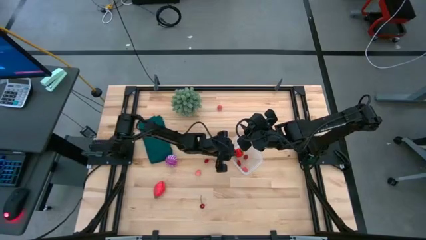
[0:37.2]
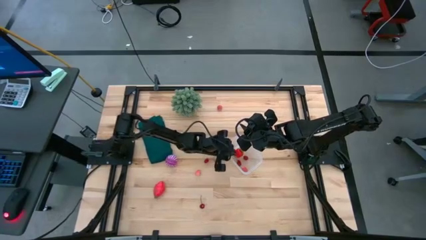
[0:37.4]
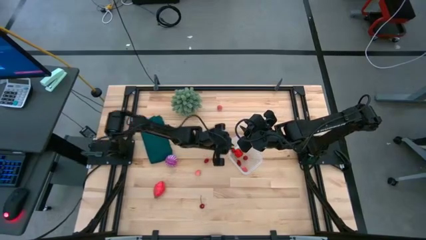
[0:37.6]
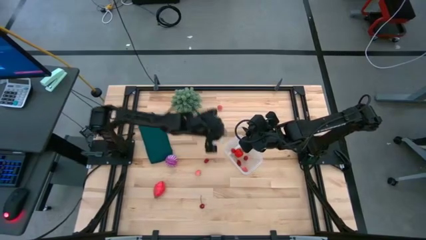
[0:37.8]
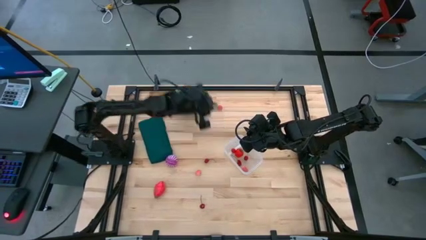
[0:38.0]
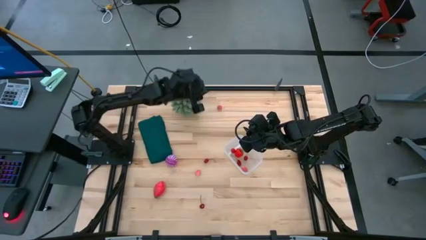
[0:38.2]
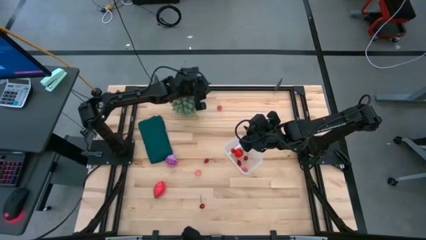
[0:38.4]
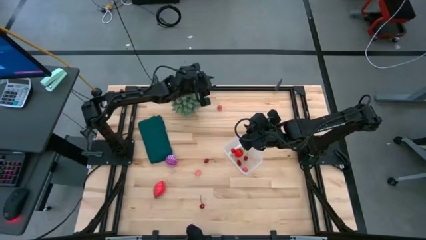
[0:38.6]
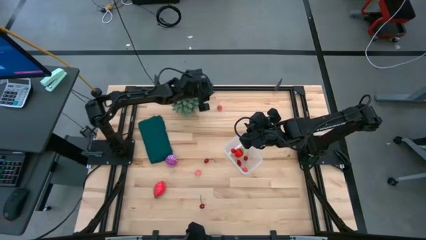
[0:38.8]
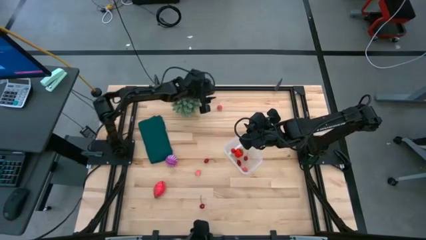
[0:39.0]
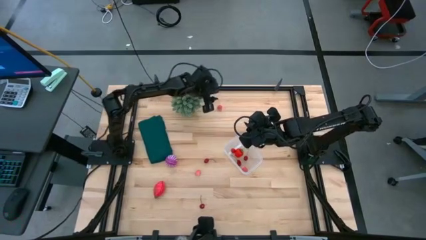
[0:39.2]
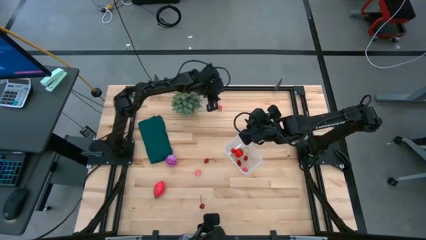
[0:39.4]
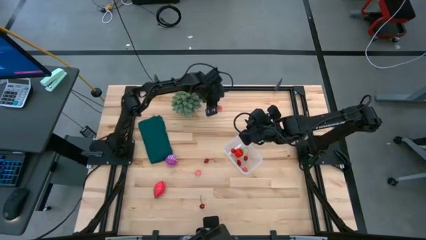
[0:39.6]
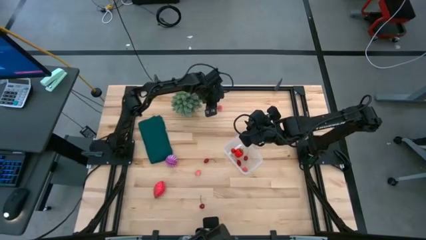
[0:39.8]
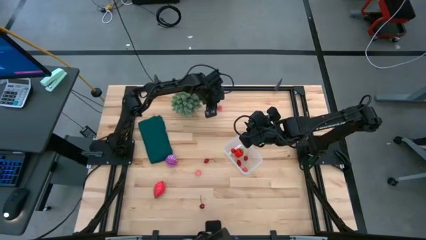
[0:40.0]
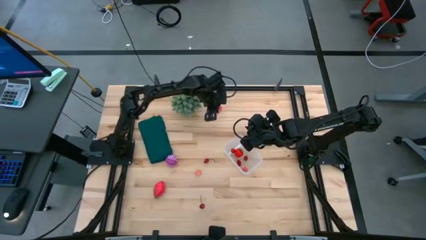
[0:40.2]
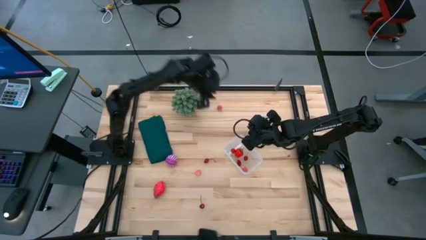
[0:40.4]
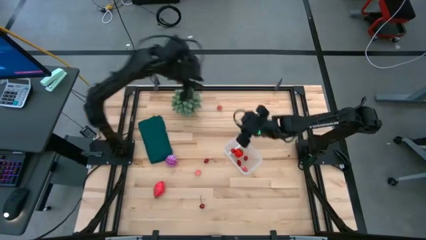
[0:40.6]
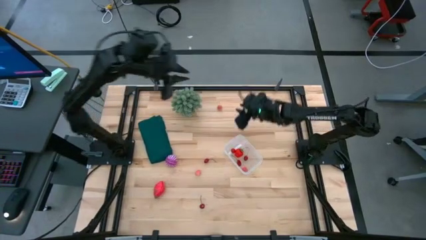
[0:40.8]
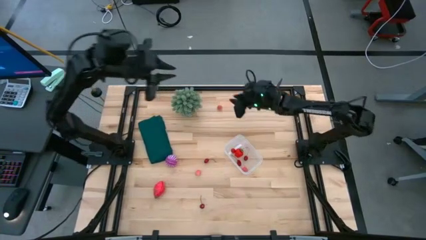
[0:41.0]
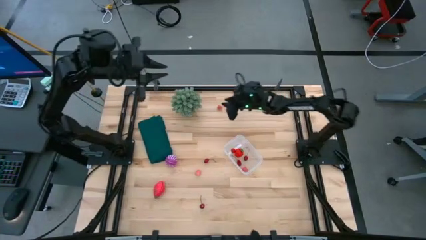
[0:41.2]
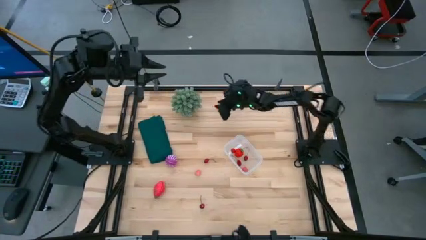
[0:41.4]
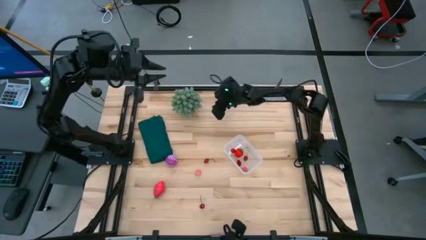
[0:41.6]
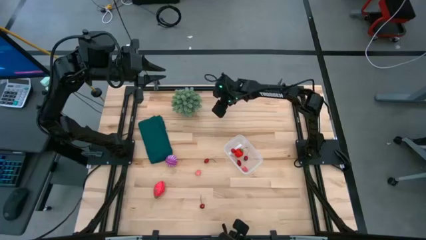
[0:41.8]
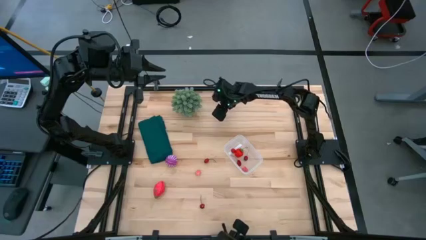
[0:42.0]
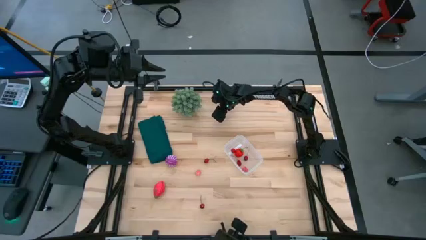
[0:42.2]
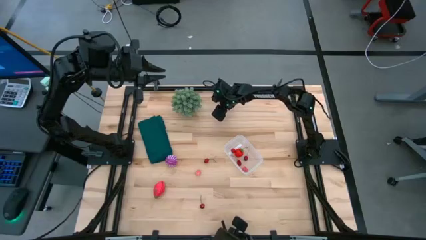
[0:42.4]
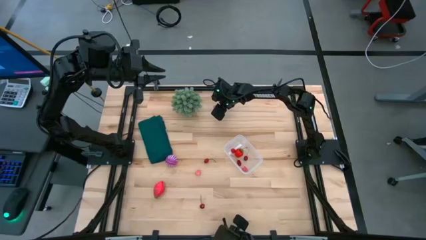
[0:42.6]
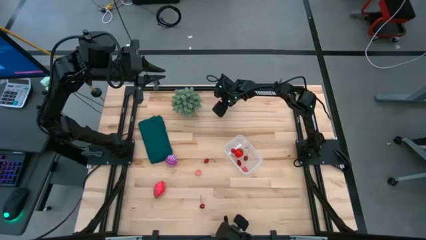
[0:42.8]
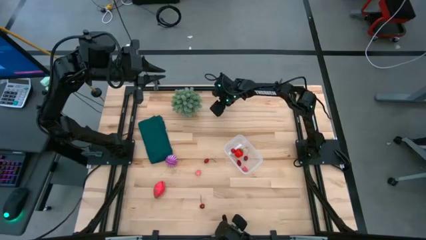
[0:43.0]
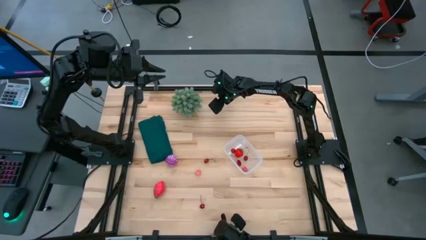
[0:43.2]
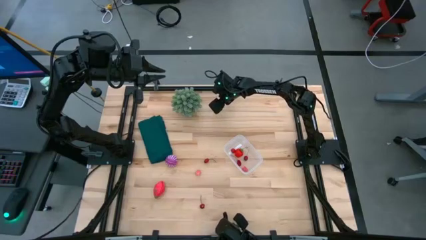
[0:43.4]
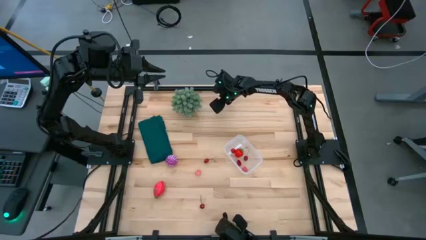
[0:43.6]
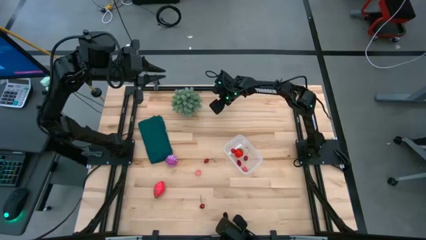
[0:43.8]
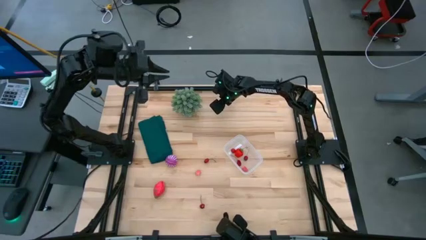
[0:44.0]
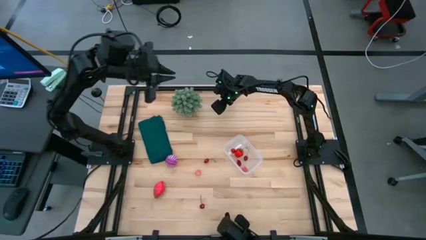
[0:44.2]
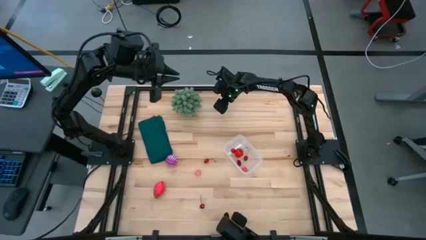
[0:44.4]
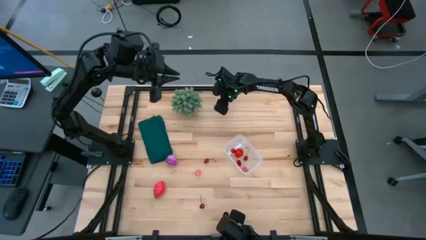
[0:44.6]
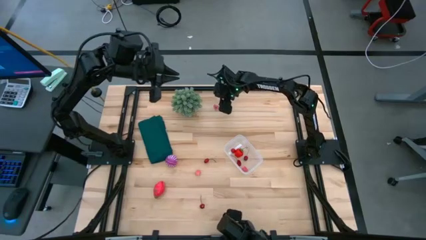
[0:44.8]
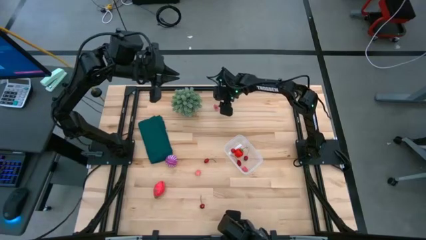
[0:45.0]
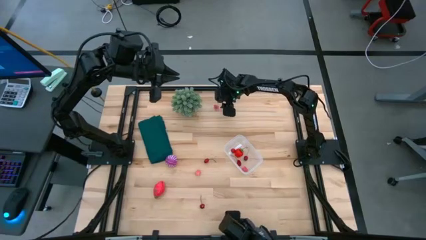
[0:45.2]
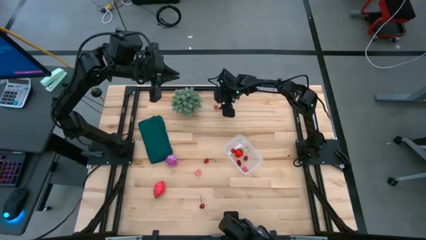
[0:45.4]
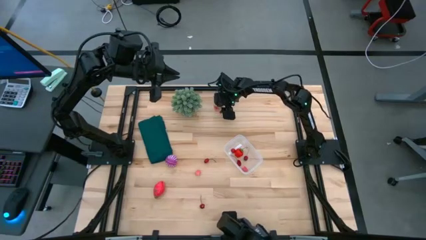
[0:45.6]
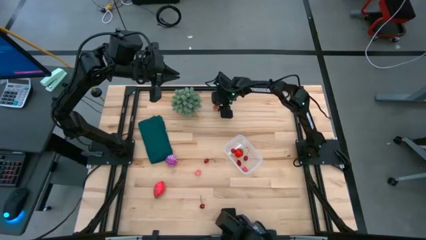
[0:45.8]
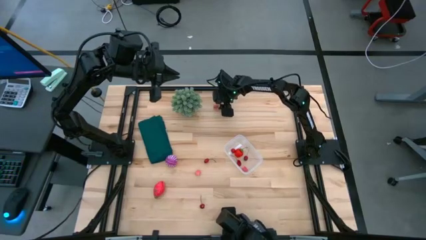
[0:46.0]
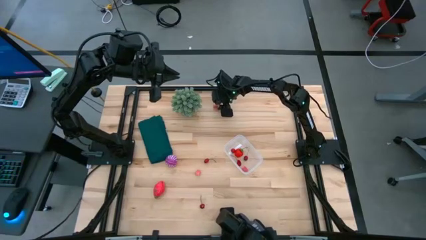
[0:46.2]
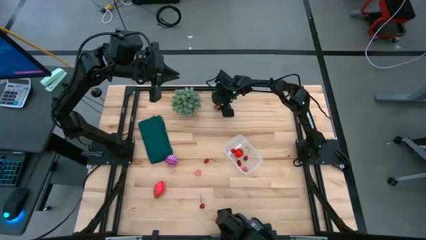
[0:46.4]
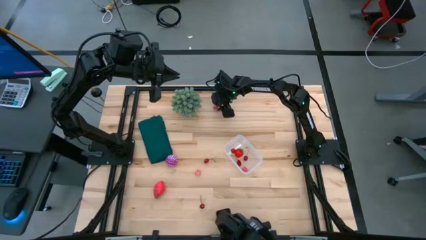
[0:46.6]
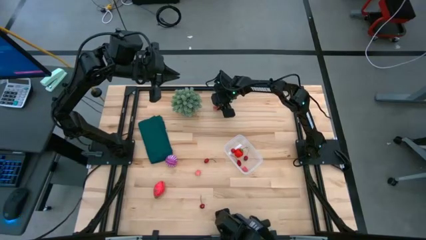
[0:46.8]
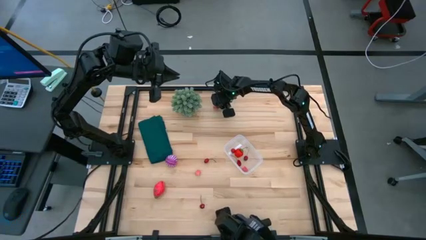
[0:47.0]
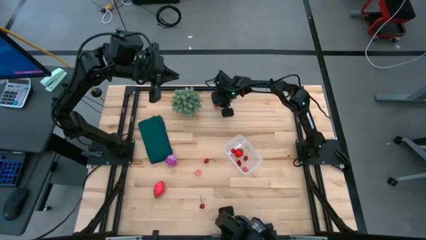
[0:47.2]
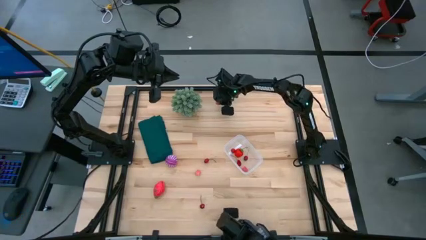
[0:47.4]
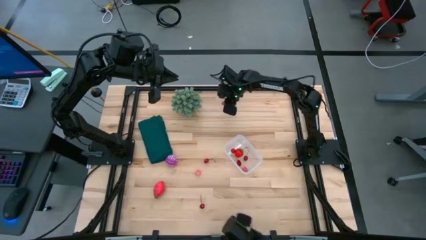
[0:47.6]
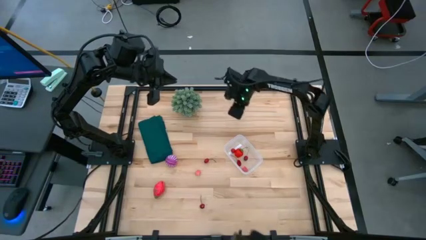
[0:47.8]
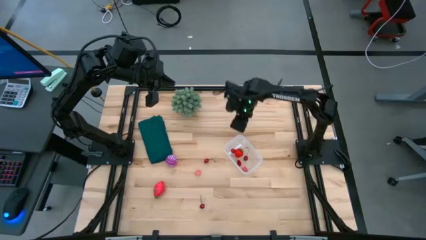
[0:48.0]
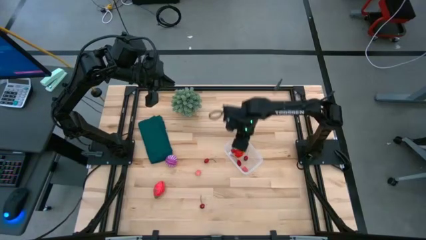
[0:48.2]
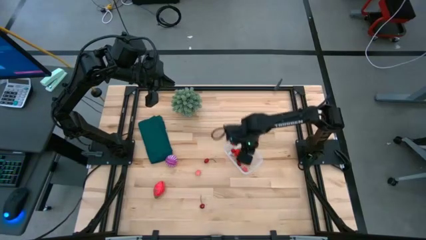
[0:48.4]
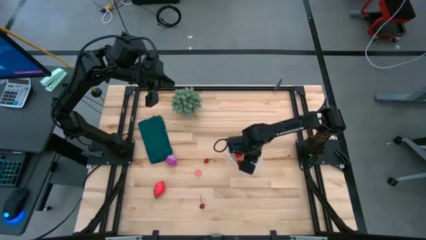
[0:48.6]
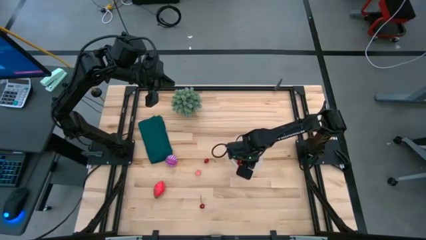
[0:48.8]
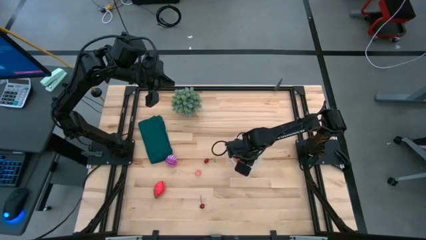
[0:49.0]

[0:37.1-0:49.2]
Task: Pick and placing Produce into tupperware
Put the top peach into the container

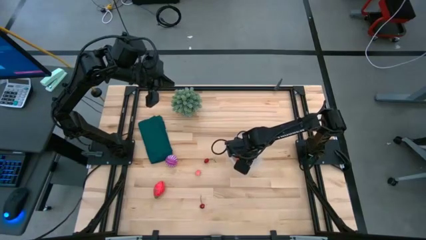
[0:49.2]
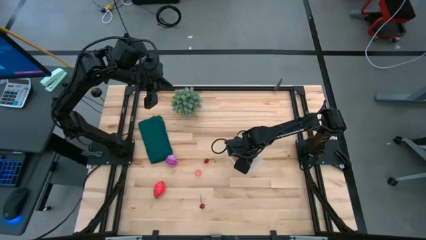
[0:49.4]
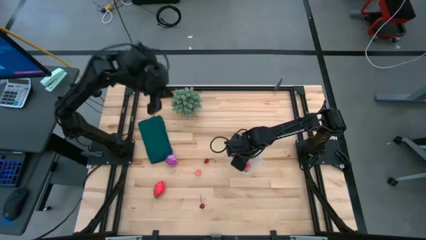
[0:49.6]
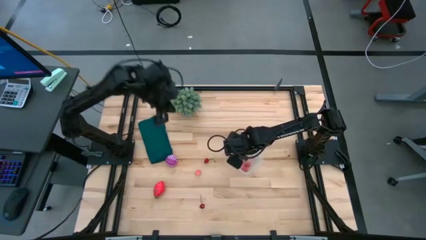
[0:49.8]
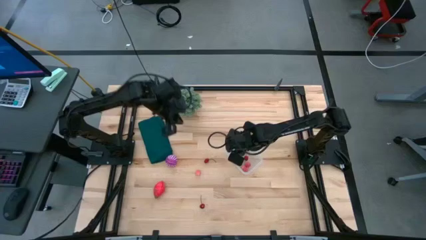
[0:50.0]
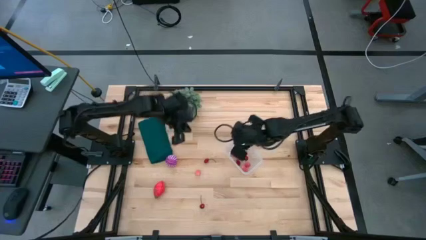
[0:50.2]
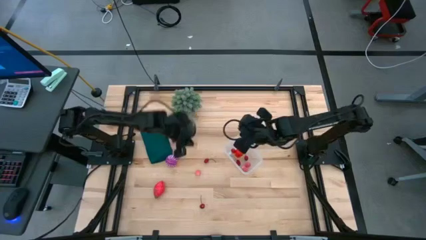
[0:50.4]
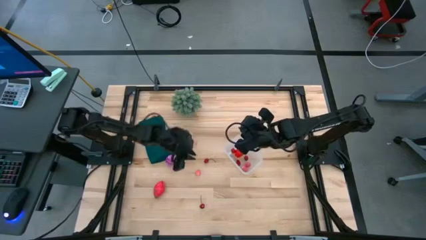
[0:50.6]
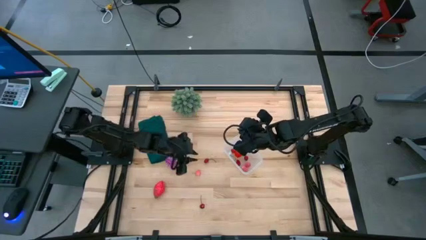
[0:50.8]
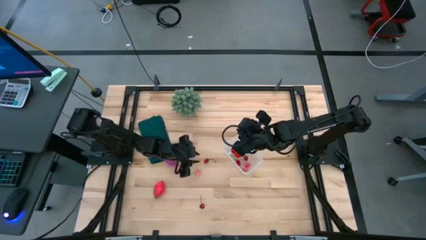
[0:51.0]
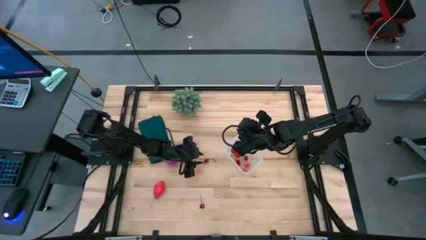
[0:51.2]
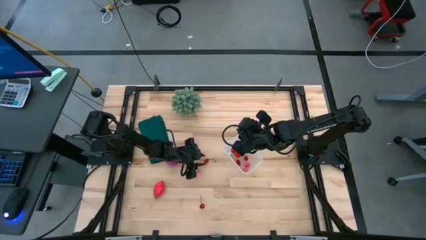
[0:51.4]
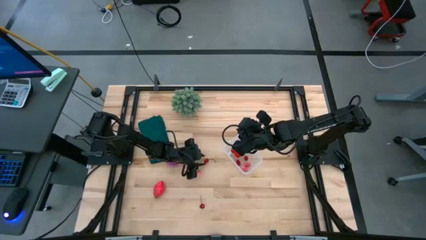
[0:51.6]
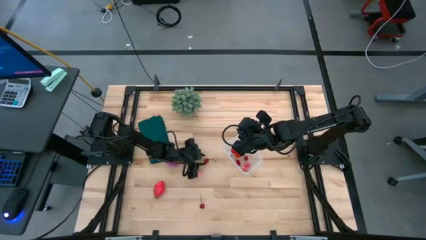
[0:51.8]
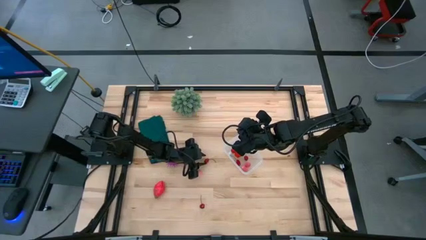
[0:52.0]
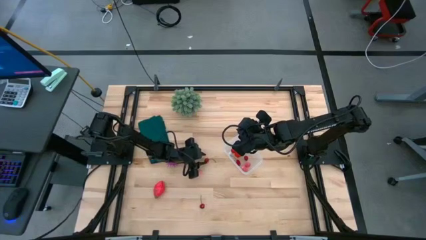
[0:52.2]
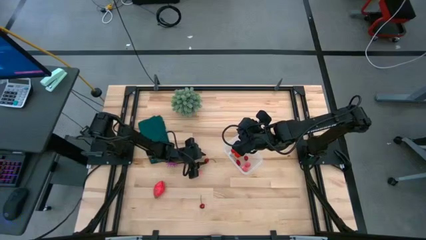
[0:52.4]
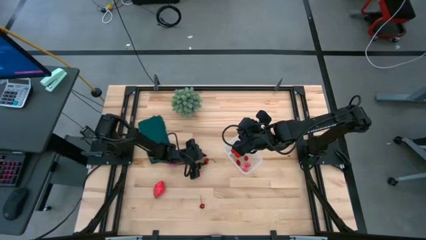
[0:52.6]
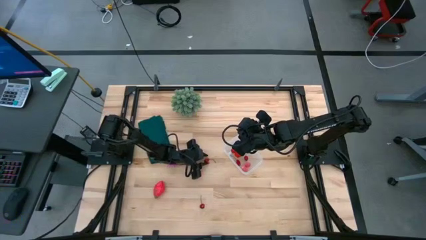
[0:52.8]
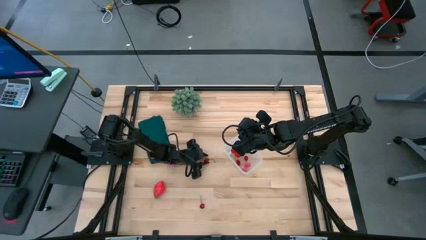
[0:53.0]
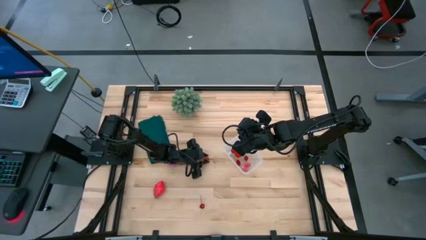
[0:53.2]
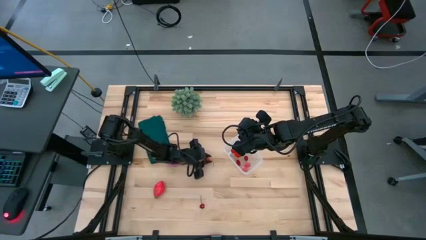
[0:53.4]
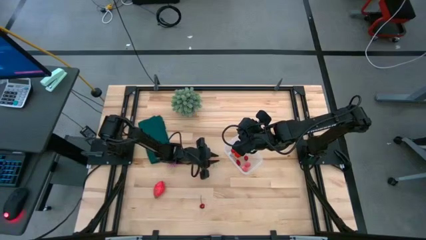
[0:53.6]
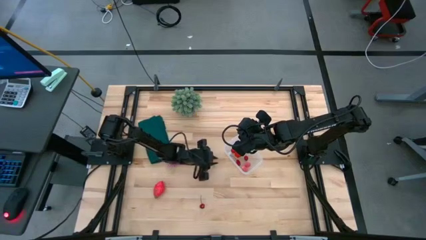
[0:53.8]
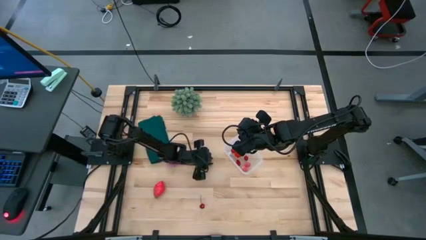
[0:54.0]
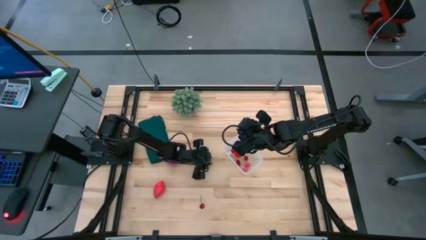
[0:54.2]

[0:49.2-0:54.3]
Put the cherry into the transparent bin
